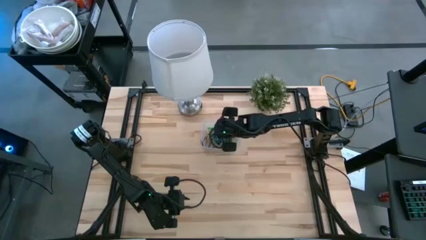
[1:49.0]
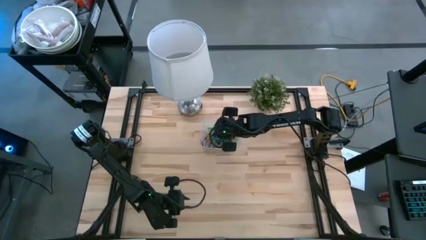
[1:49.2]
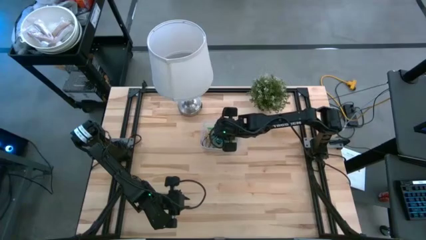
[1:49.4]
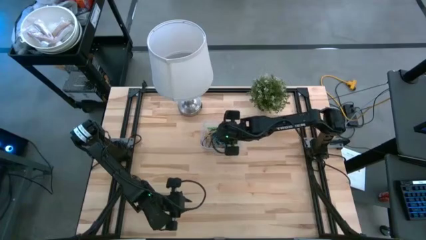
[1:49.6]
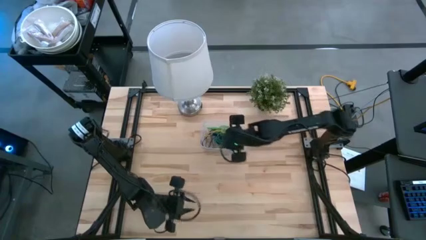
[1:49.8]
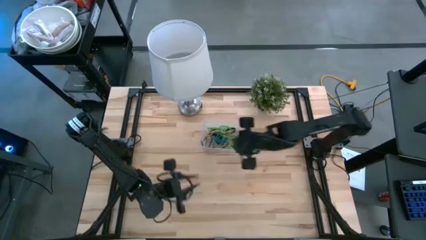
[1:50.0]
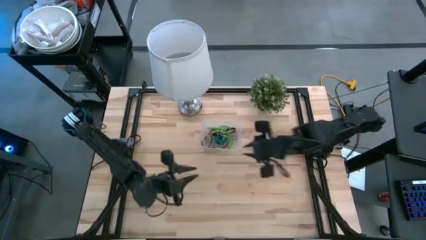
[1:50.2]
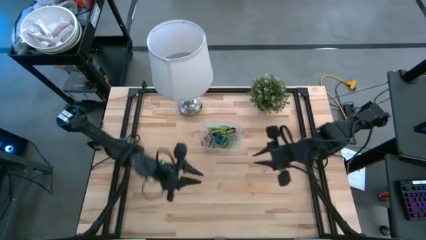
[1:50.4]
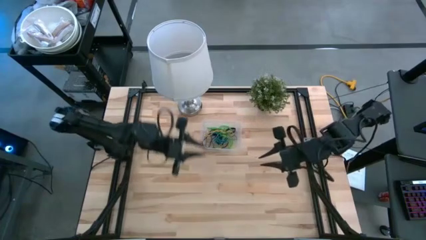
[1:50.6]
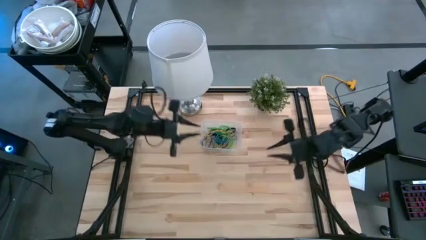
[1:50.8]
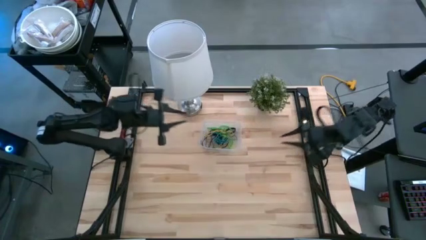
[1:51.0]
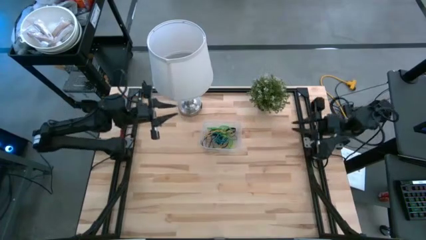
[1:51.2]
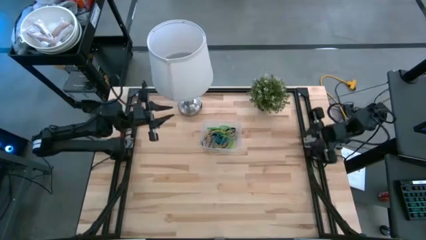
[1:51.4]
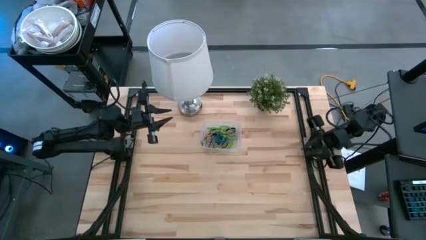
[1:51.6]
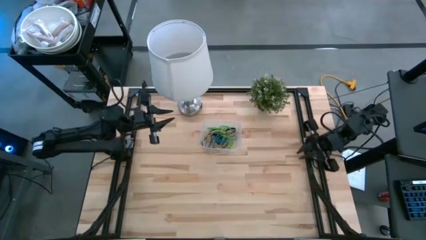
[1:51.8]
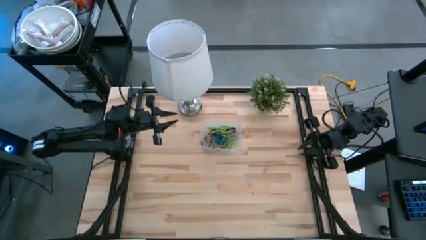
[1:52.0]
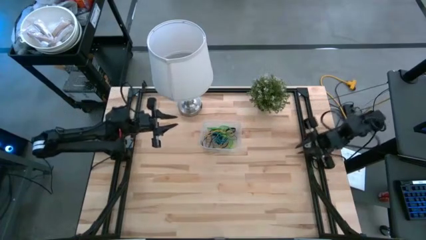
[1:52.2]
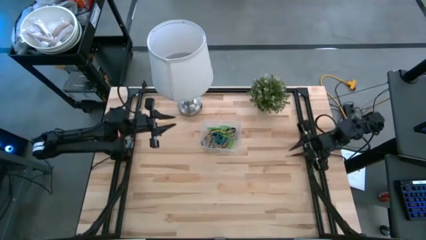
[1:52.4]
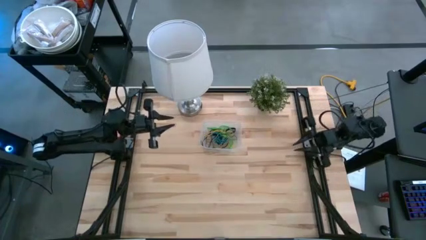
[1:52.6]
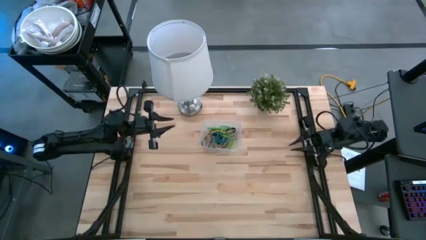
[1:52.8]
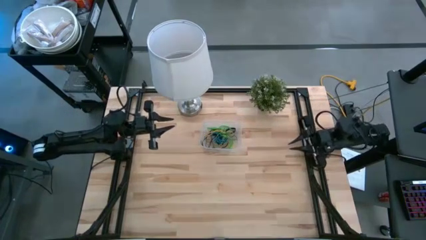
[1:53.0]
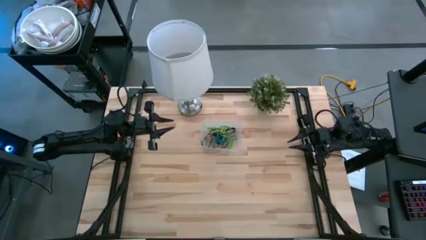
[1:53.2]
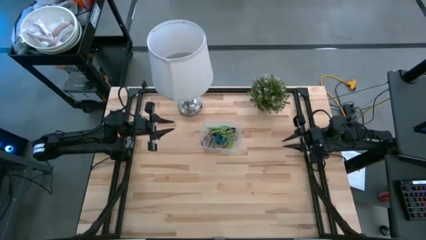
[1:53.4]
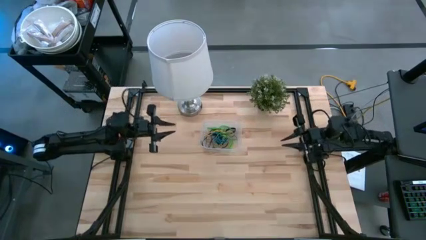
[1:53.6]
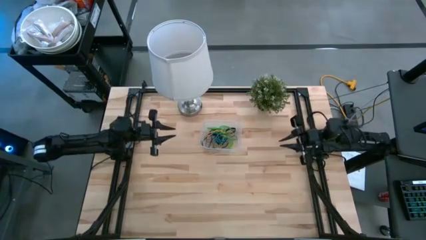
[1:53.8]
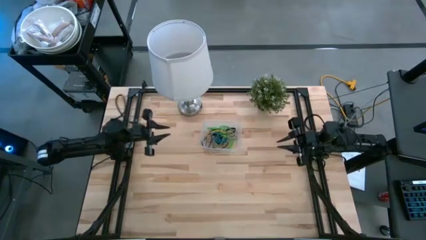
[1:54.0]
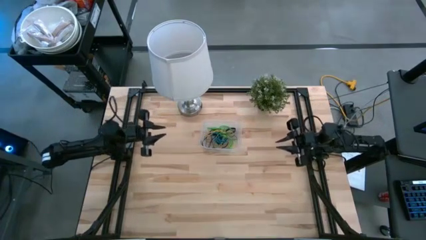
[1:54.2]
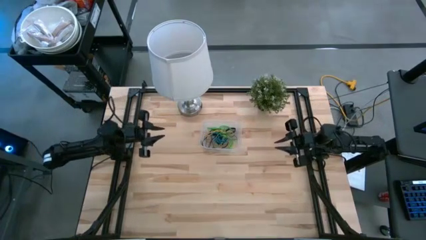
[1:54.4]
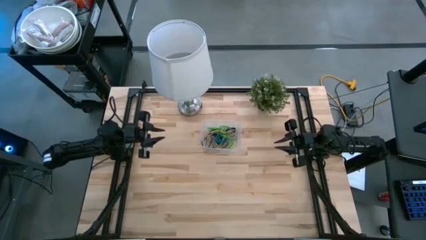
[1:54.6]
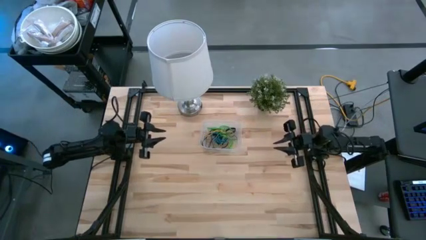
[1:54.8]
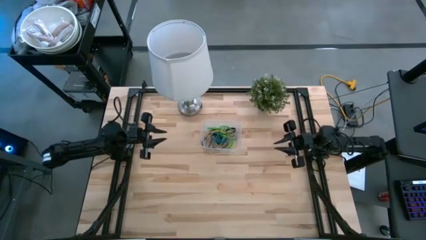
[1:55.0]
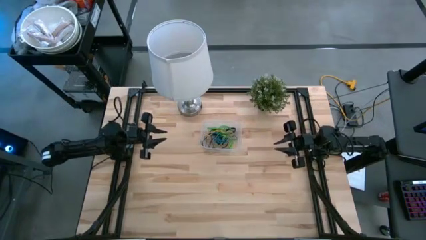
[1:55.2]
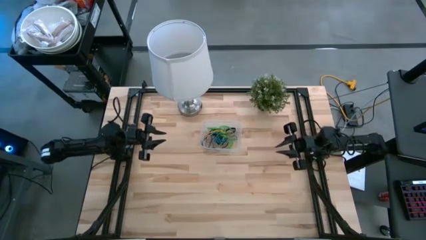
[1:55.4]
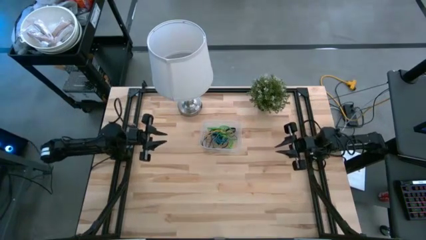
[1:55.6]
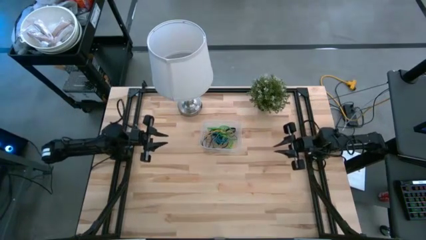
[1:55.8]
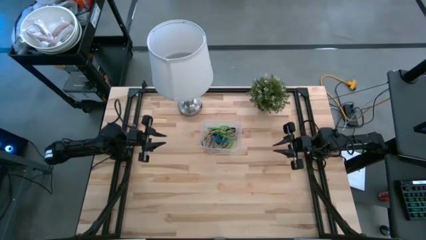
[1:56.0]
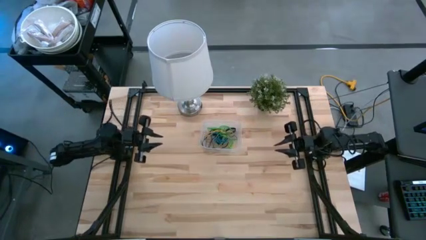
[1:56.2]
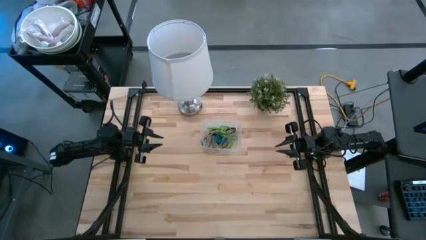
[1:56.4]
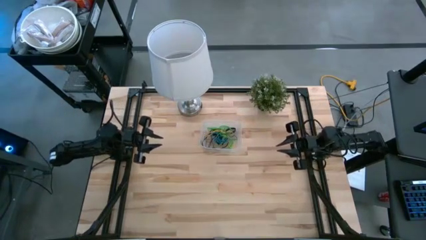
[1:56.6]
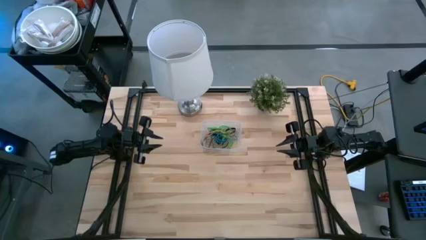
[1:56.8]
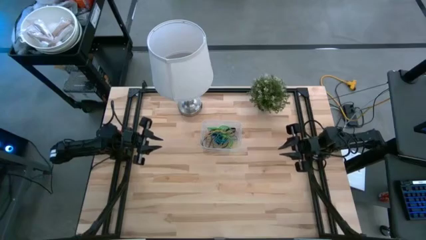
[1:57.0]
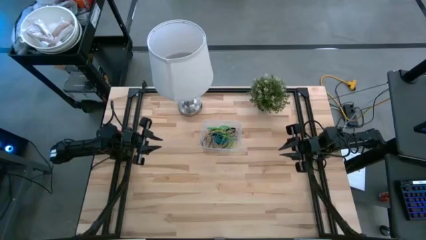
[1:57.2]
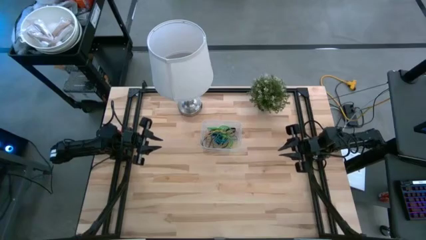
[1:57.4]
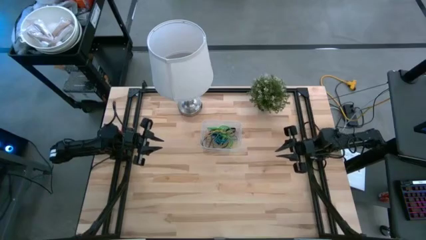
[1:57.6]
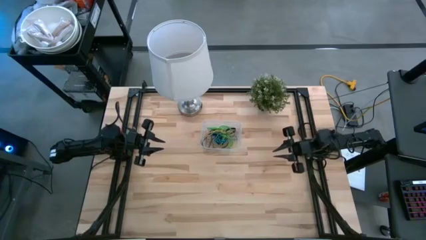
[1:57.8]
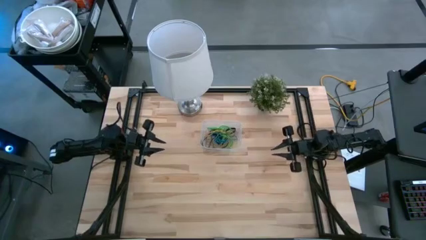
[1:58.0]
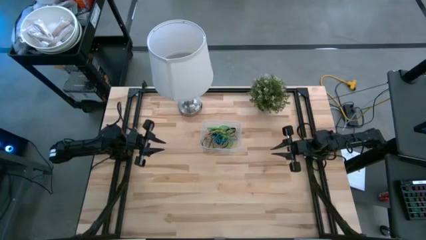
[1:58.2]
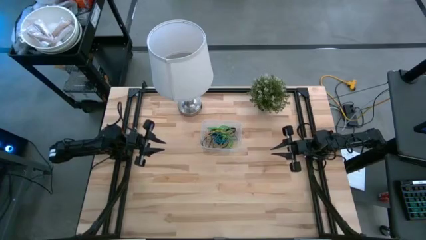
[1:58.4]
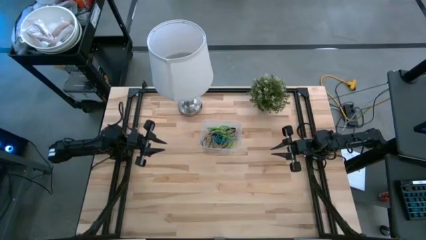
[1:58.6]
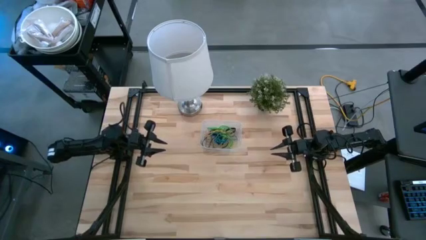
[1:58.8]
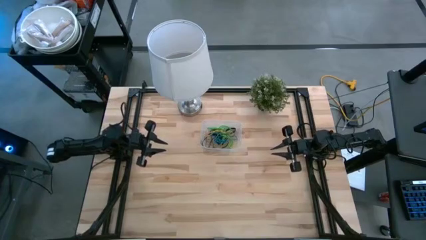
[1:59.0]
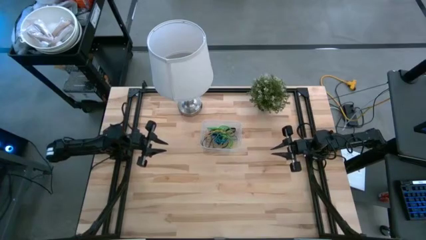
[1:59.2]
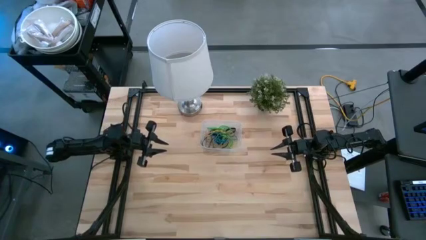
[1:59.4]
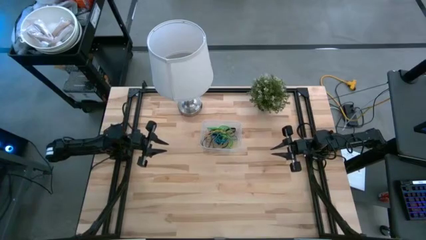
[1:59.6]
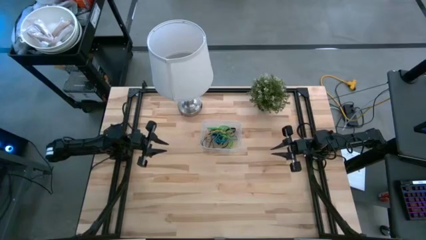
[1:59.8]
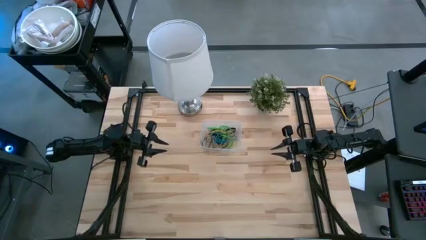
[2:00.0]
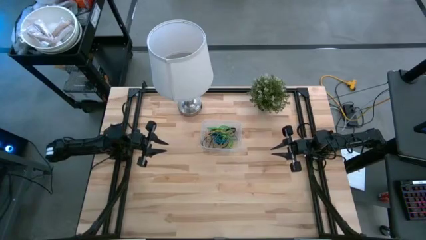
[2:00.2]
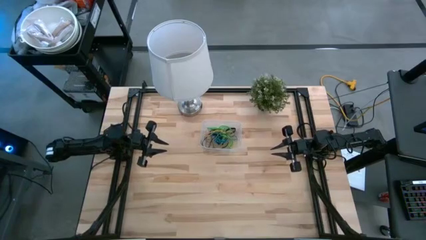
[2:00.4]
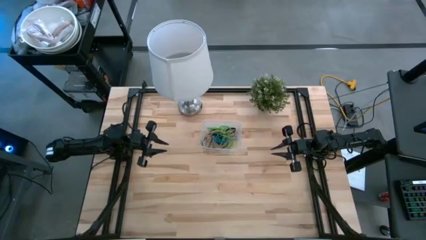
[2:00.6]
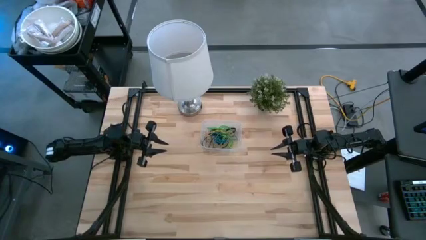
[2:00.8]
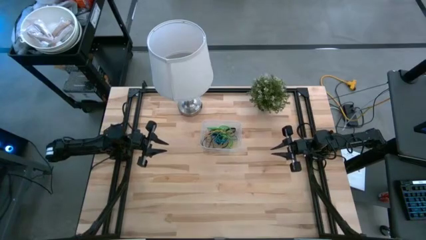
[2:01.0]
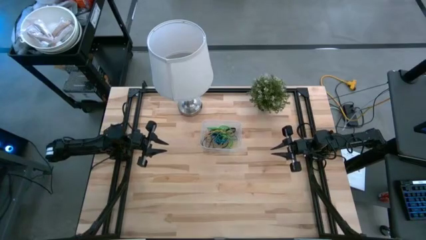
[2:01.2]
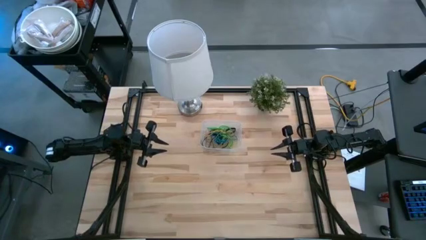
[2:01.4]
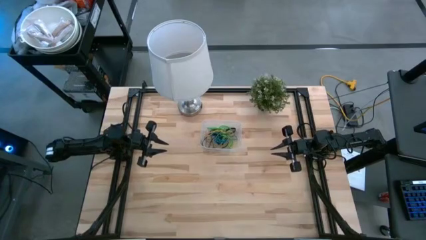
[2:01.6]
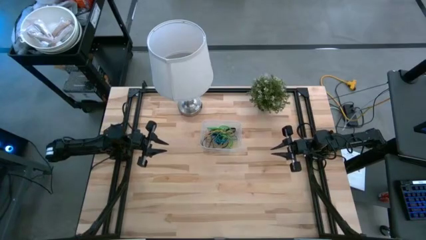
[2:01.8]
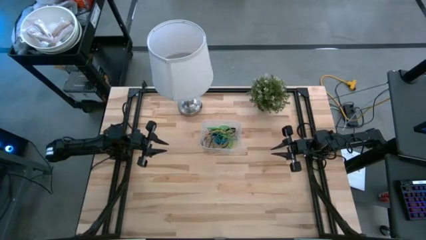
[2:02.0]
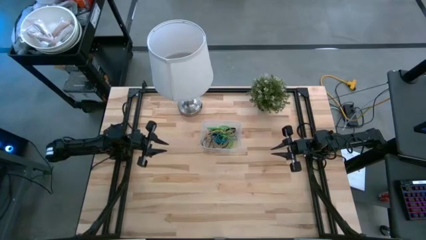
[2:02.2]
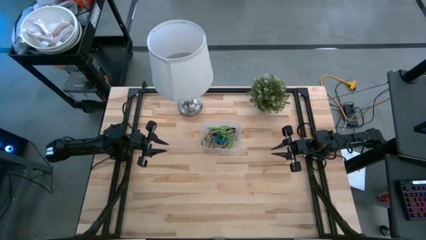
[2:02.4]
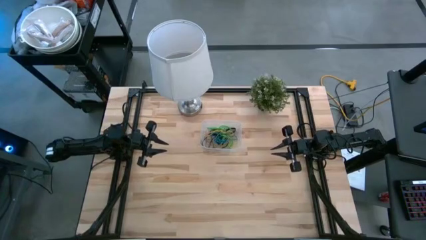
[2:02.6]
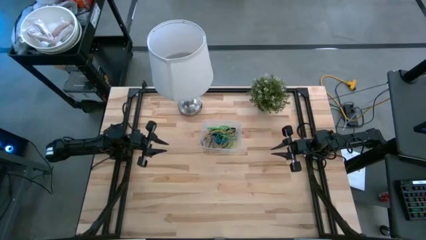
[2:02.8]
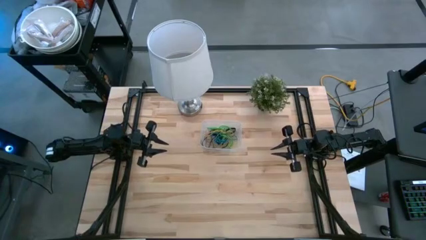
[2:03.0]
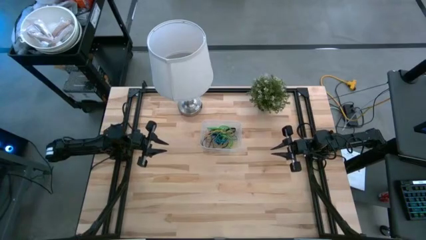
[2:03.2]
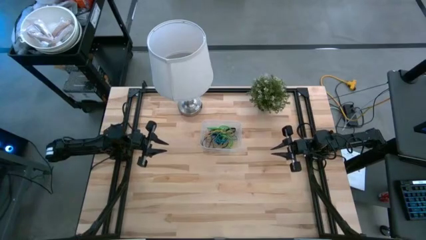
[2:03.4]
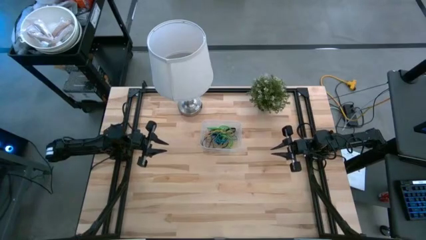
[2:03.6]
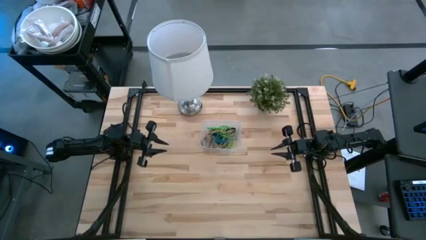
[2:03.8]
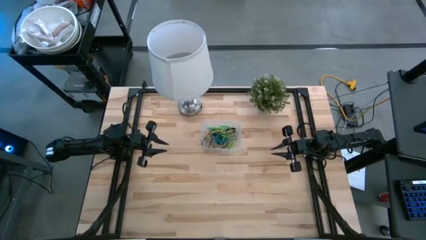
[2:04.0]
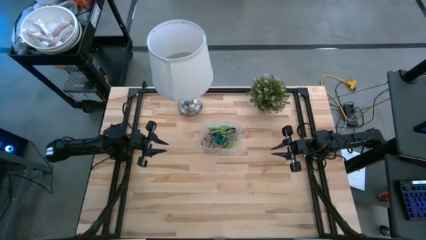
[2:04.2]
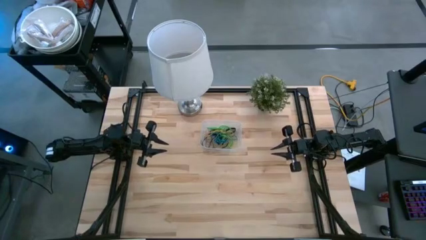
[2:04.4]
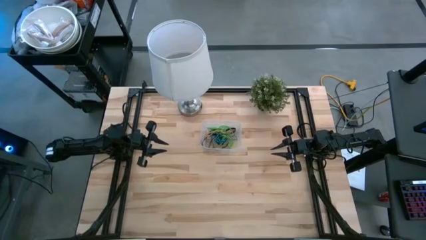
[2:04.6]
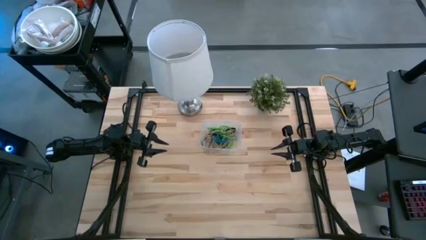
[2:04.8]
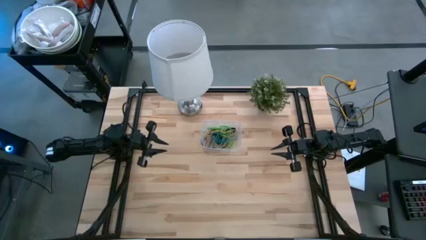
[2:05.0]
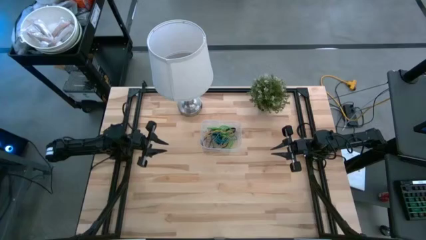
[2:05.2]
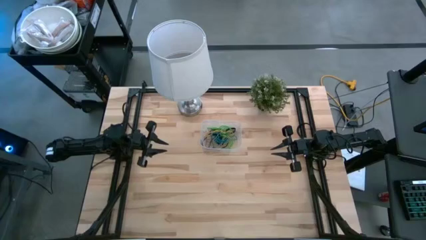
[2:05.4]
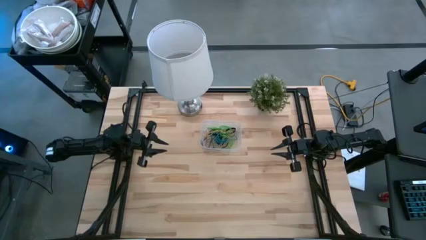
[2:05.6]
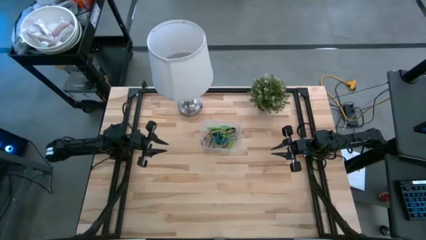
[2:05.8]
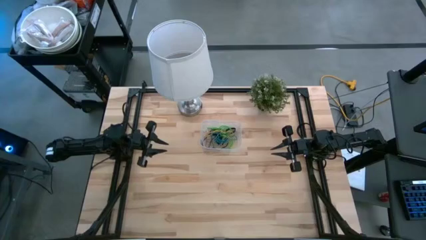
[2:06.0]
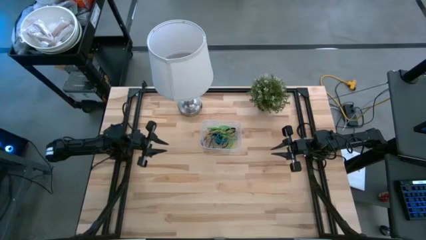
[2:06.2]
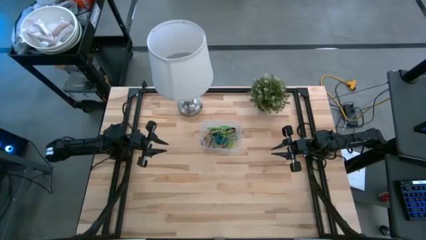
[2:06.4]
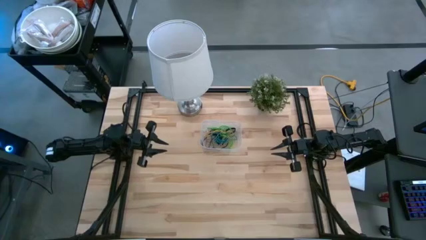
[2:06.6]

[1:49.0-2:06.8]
Task: Pick and place rubber bands into bin
Return to Home Position
